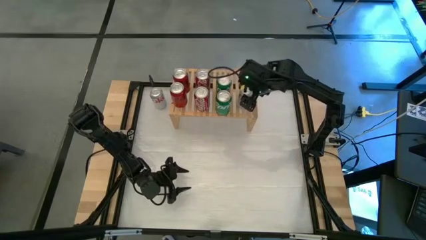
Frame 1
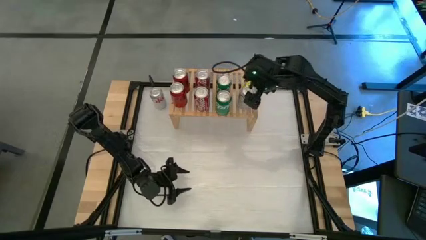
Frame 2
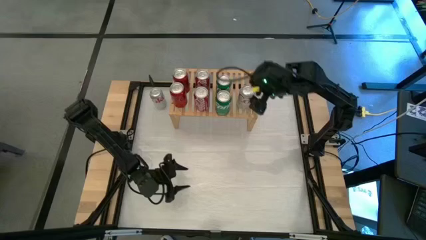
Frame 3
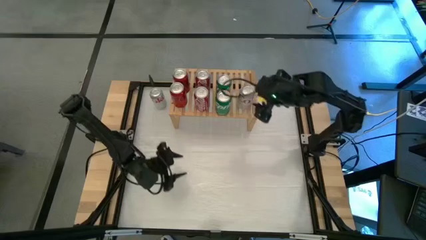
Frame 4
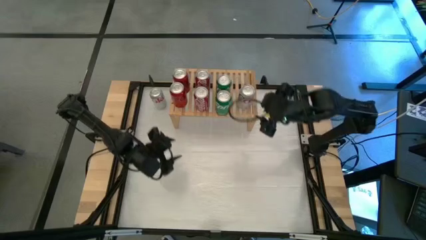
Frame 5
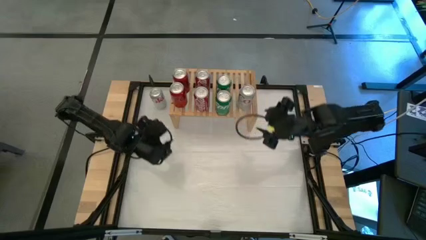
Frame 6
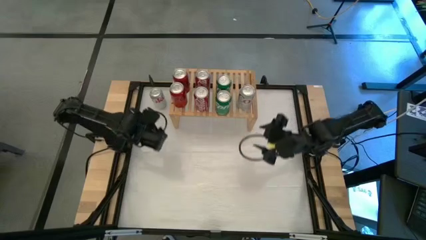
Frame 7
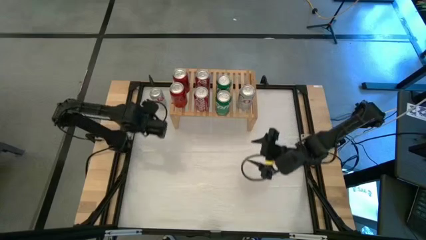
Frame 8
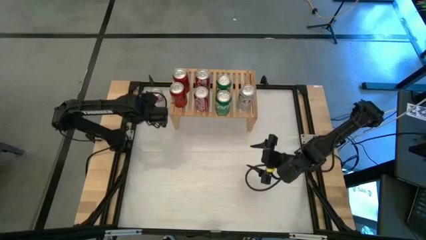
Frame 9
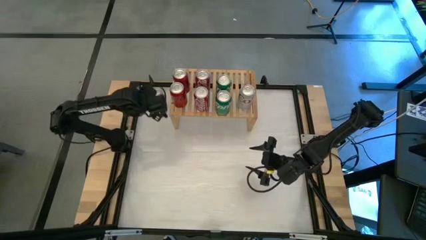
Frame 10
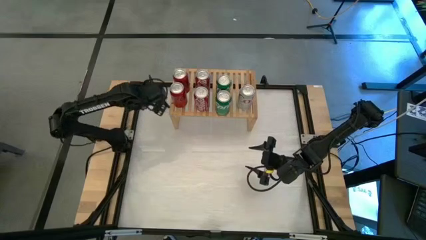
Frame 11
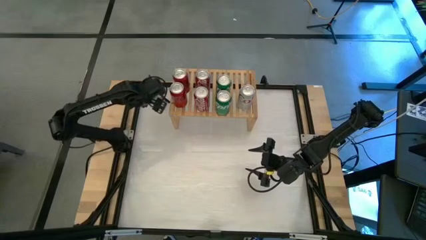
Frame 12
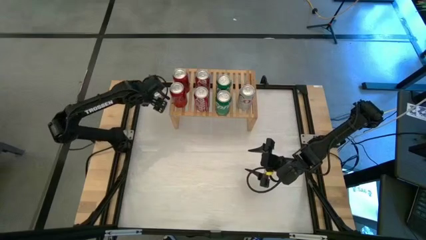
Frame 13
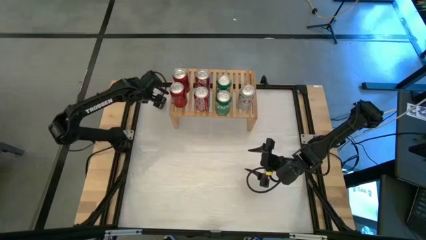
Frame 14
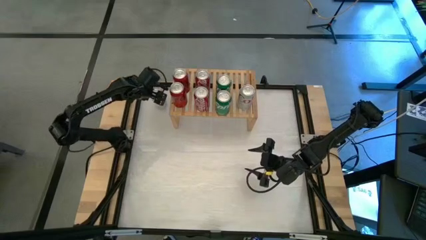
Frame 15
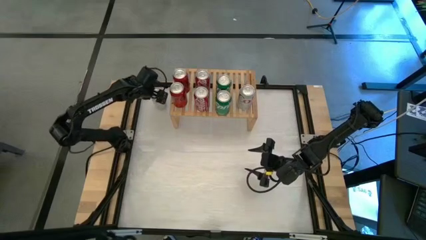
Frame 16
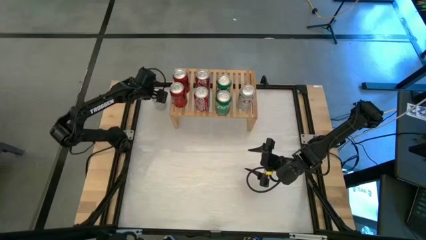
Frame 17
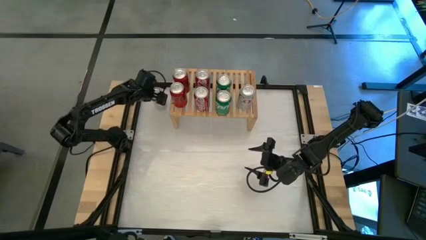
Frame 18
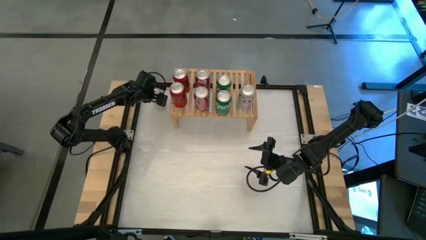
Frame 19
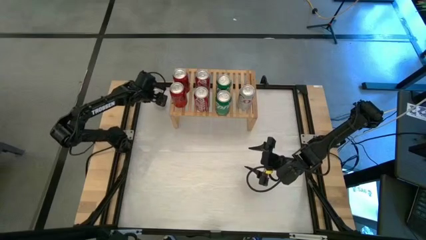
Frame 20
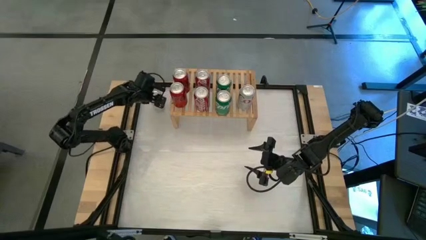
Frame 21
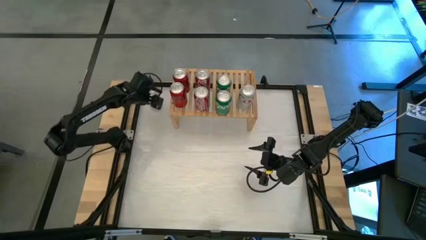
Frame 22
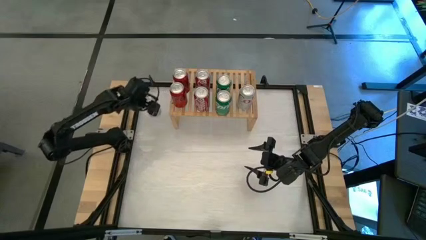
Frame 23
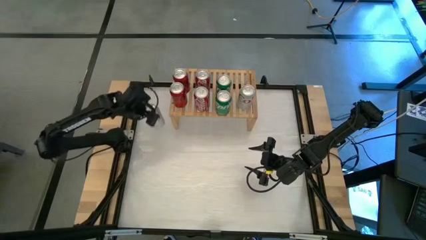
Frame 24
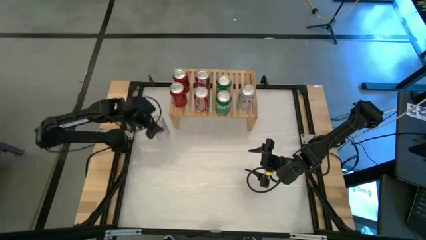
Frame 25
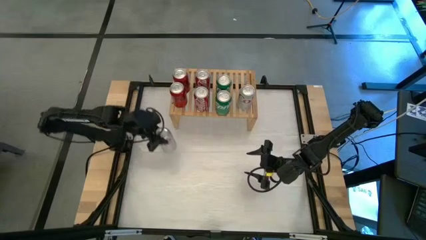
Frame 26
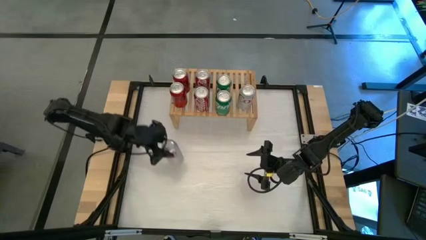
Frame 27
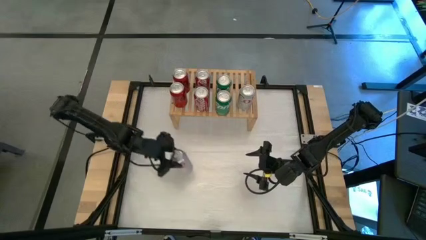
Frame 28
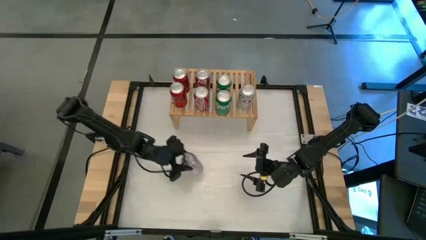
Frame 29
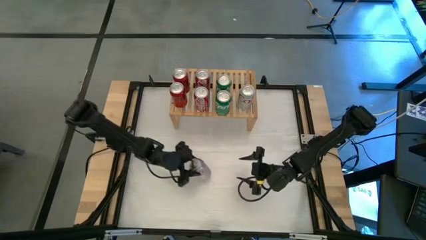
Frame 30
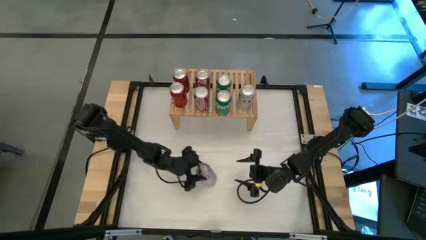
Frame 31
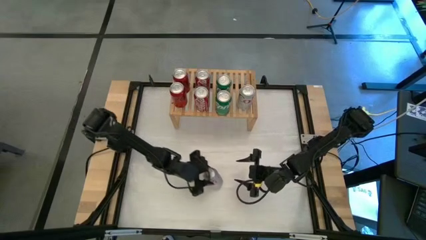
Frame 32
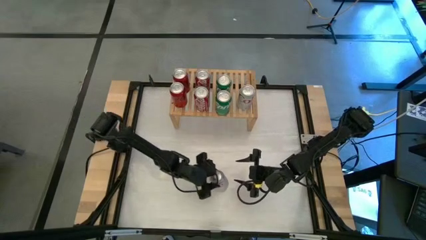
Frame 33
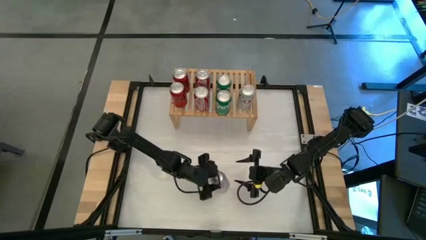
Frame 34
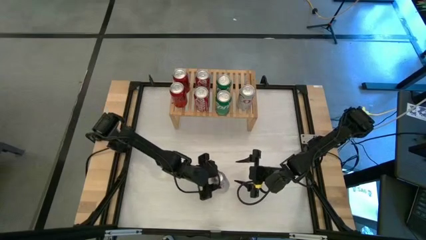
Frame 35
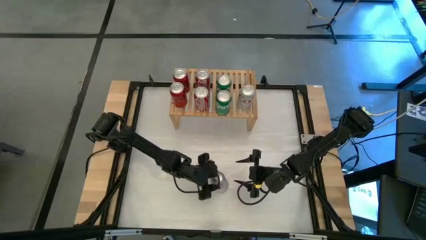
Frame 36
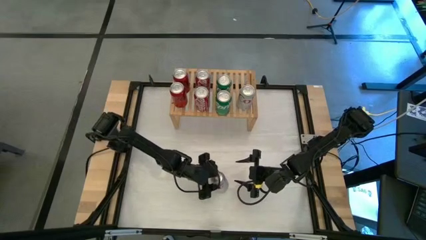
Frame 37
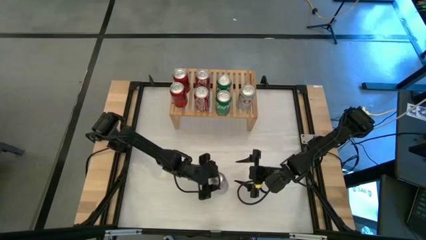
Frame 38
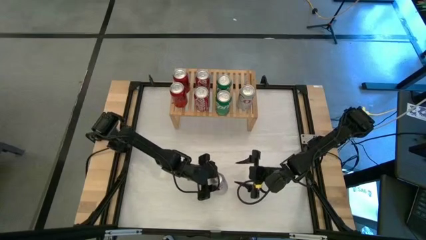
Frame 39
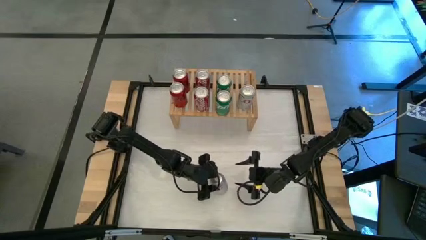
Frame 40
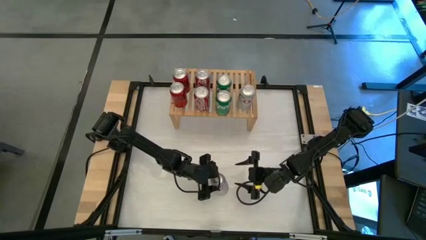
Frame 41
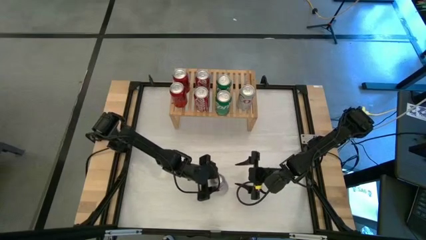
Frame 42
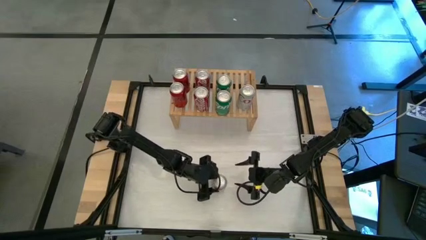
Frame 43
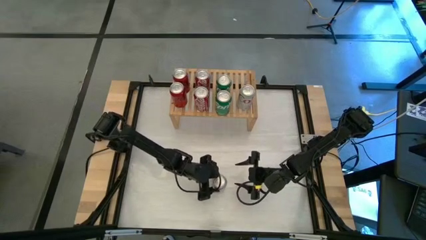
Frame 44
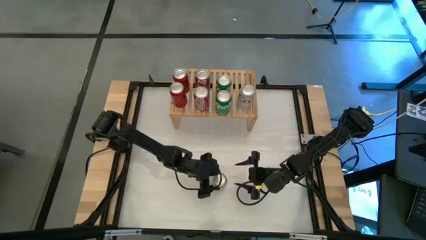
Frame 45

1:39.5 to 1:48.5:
Task: Place canned beverage on shelf
Move the silver soda can to the center of the table

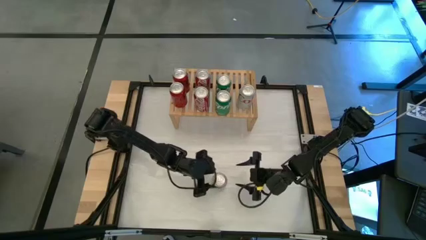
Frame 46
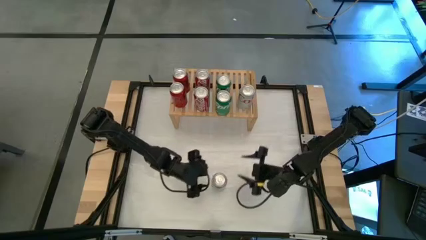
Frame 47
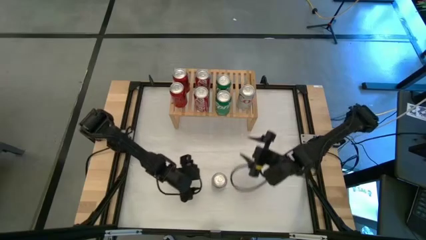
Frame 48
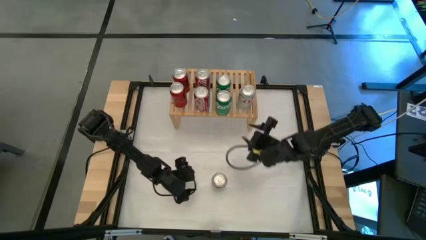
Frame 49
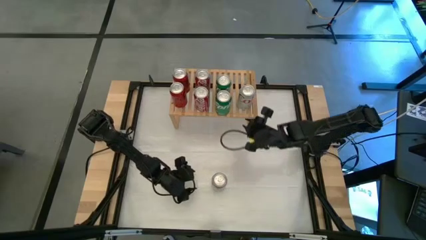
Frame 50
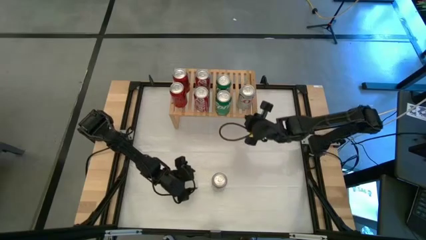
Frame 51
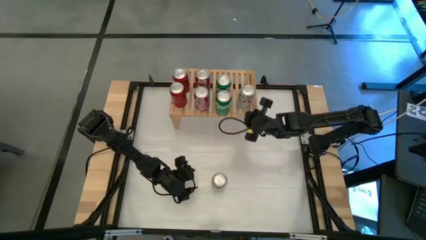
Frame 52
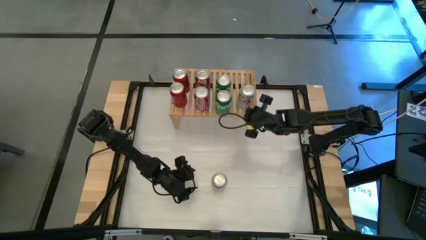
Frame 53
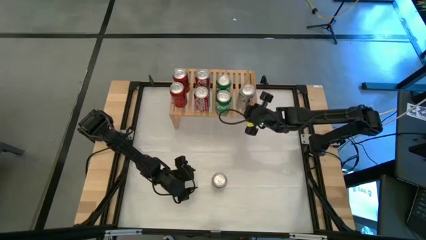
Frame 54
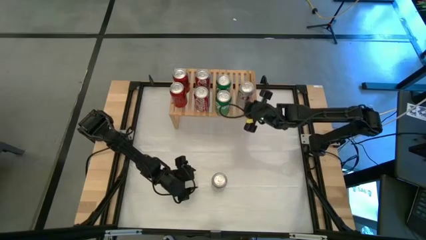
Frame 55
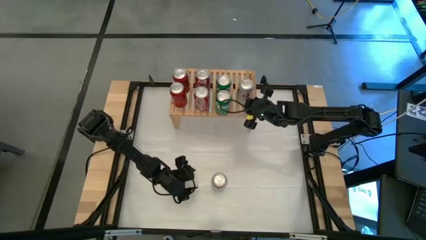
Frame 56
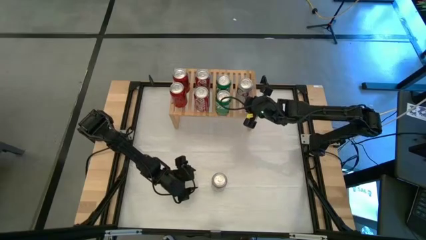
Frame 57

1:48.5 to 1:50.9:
Adjust the silver soda can on the shelf

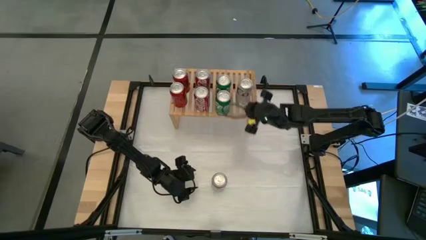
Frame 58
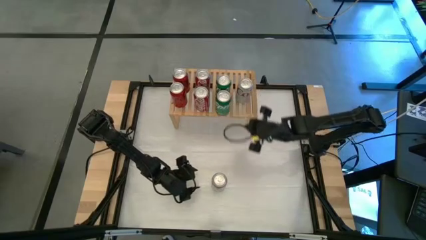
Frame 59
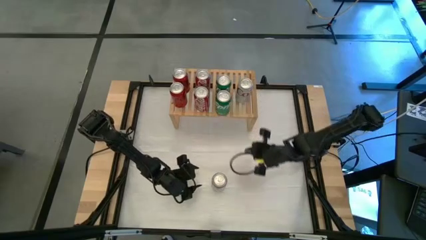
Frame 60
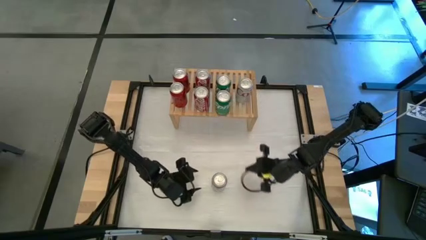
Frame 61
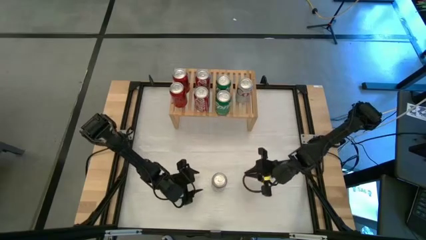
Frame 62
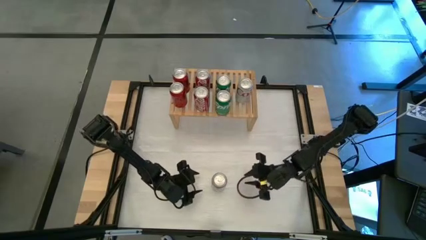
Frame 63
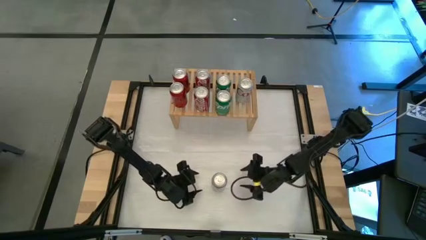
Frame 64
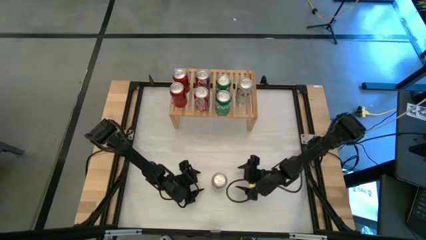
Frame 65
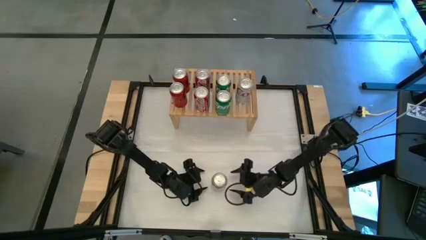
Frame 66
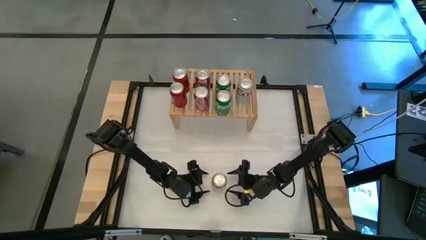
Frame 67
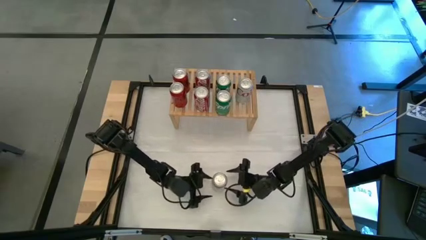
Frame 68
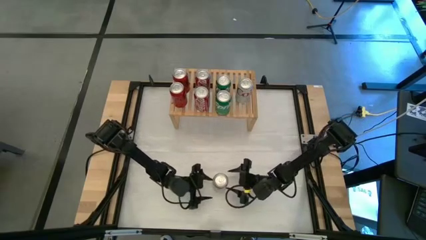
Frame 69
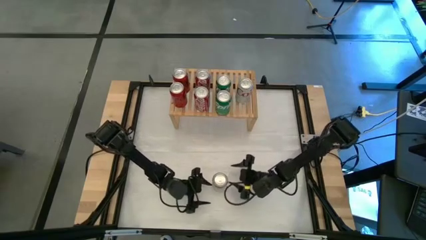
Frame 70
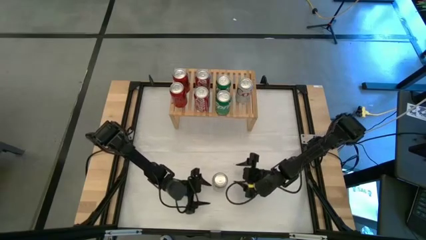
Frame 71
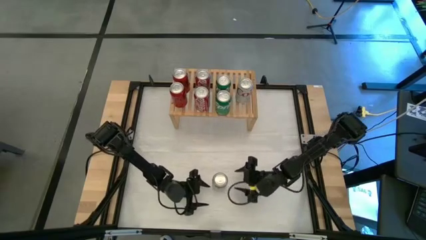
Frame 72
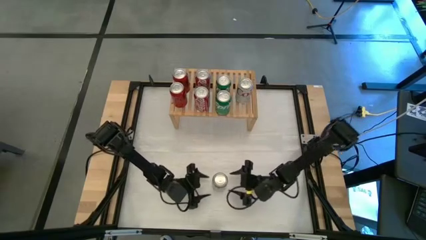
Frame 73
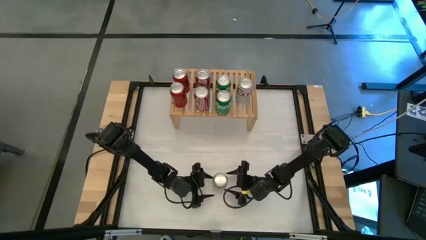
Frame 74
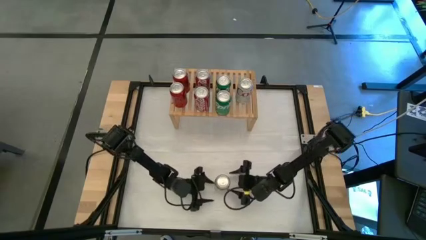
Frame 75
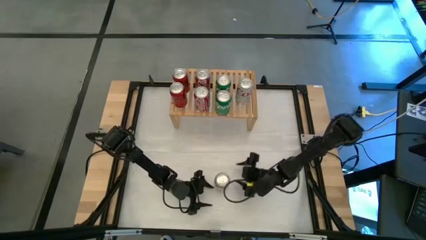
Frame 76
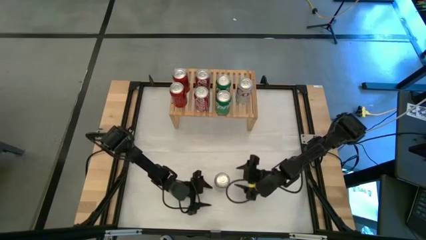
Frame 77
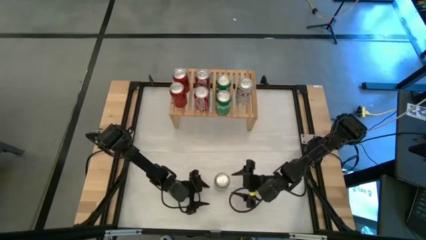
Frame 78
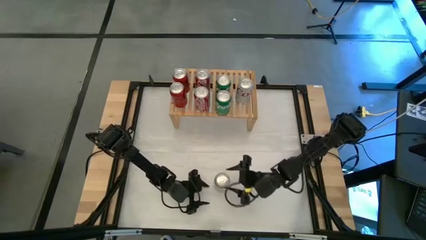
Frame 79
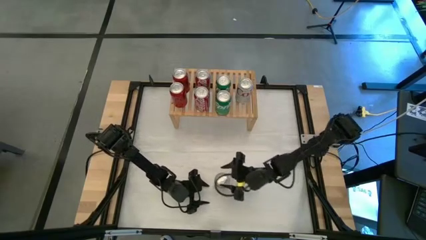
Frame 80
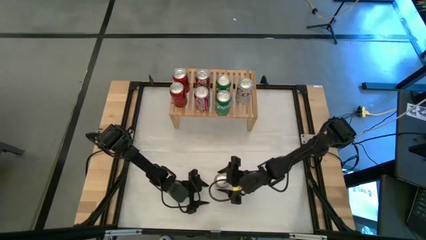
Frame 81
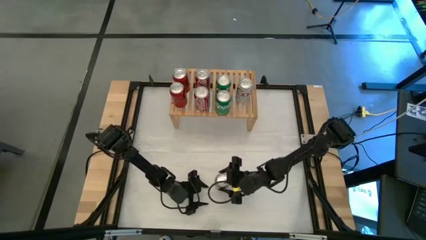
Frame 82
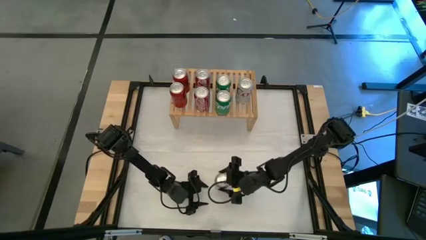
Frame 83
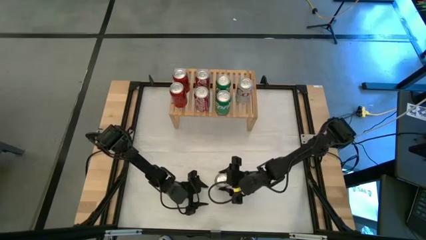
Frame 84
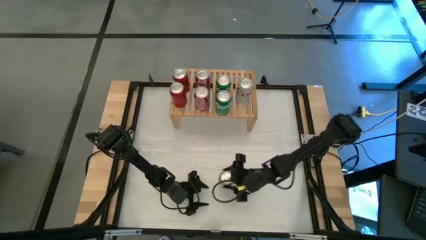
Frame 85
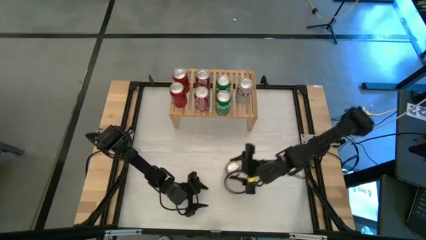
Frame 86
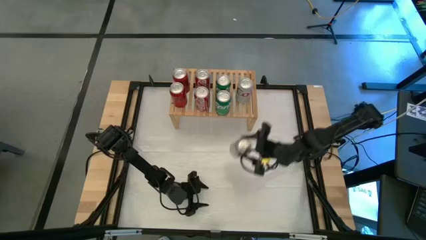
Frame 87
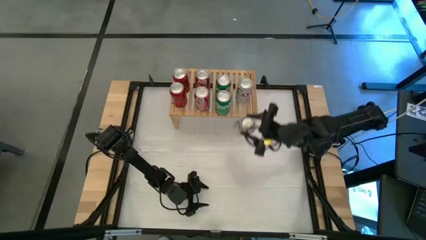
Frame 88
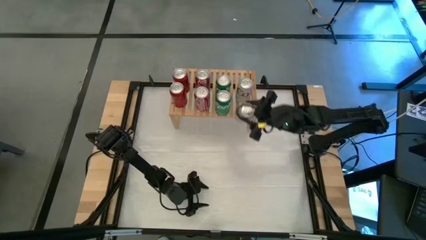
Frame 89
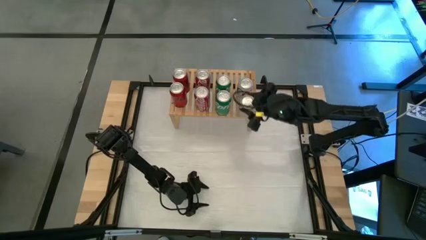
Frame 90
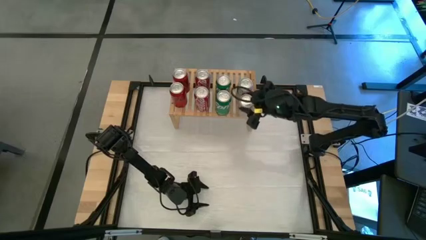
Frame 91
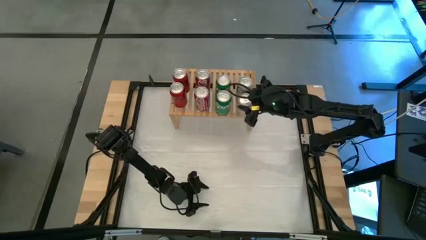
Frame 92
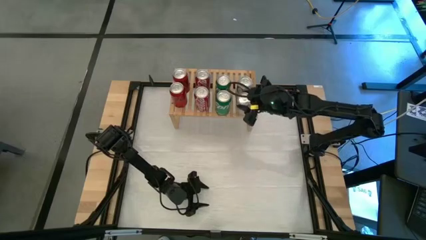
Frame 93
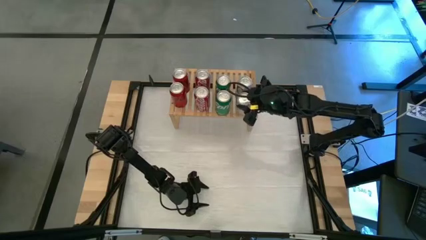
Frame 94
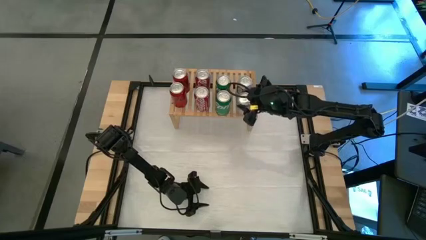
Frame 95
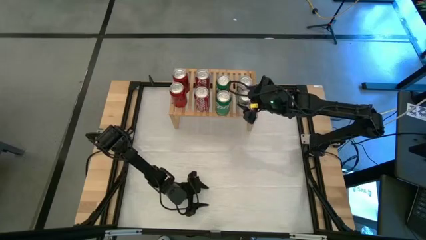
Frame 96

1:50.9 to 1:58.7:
Put the silver soda can on the shelf aligned with the other silver soda can
